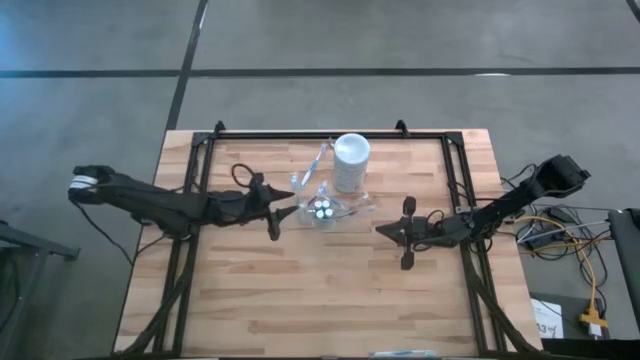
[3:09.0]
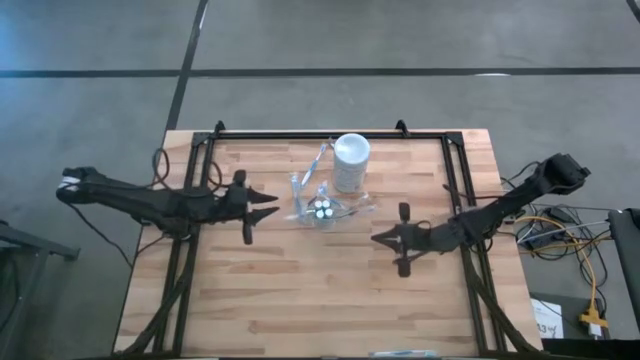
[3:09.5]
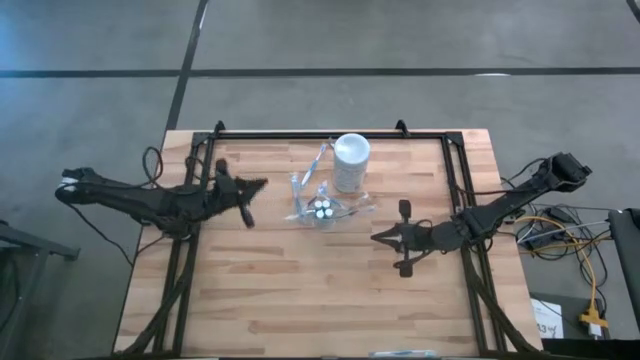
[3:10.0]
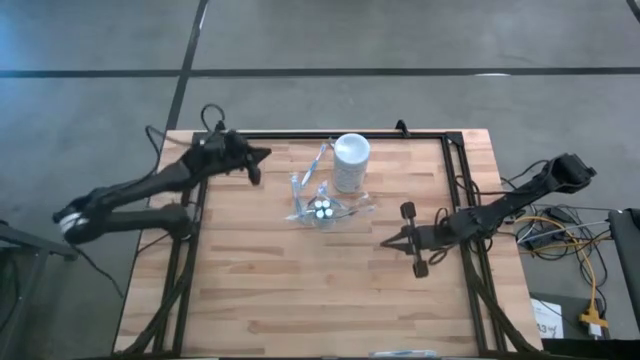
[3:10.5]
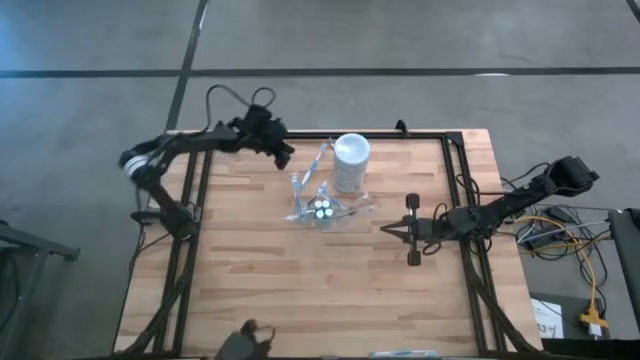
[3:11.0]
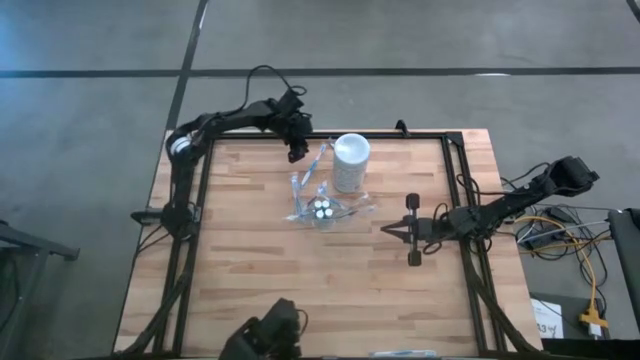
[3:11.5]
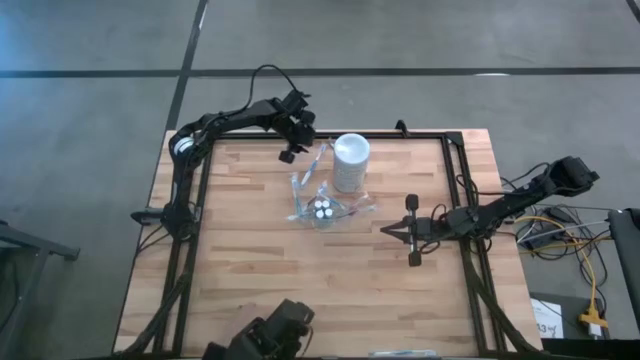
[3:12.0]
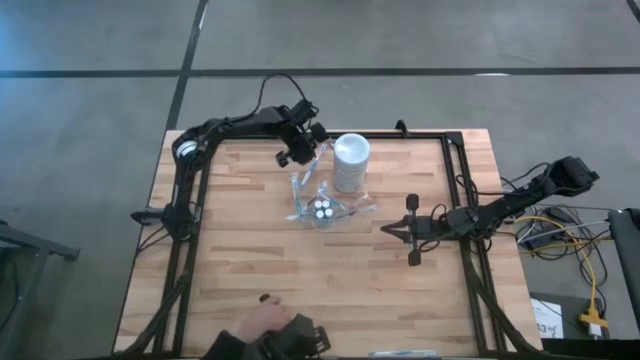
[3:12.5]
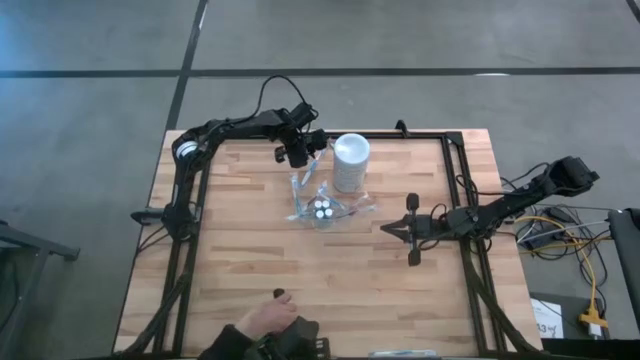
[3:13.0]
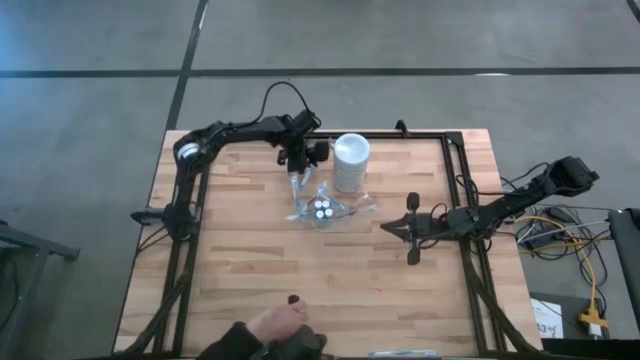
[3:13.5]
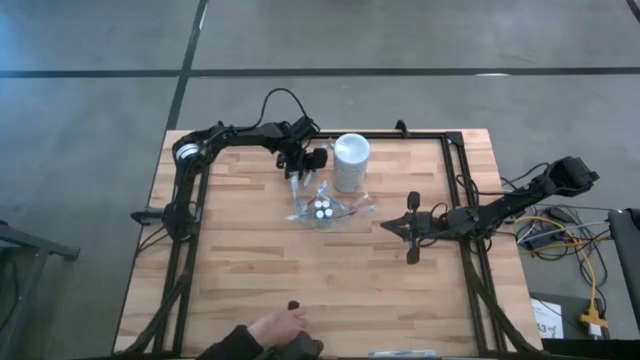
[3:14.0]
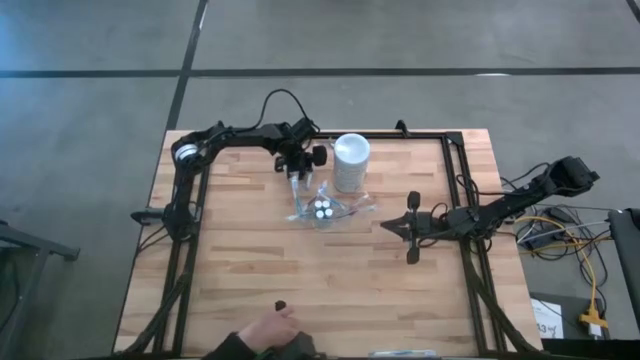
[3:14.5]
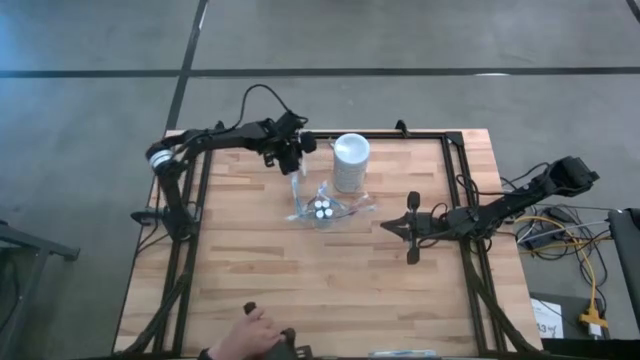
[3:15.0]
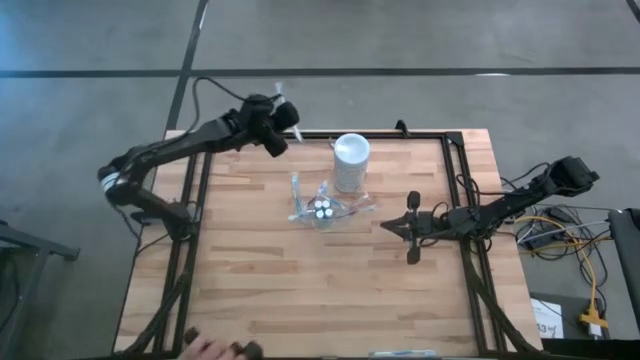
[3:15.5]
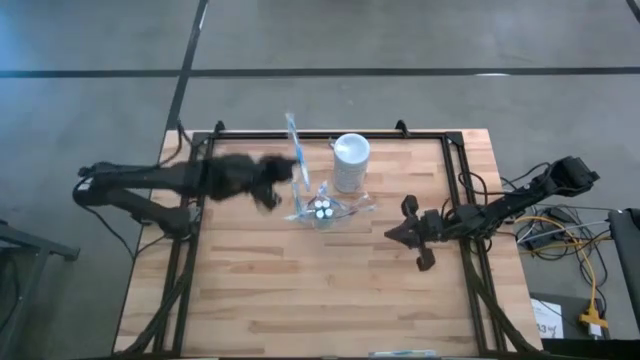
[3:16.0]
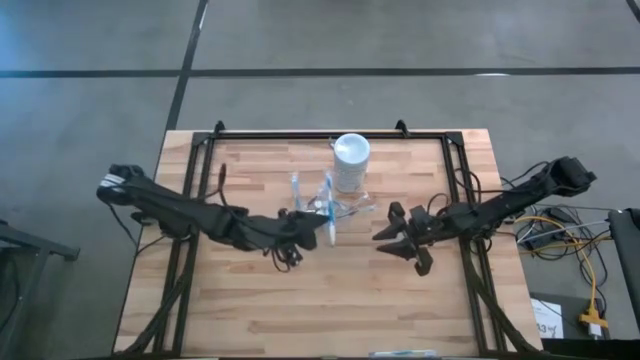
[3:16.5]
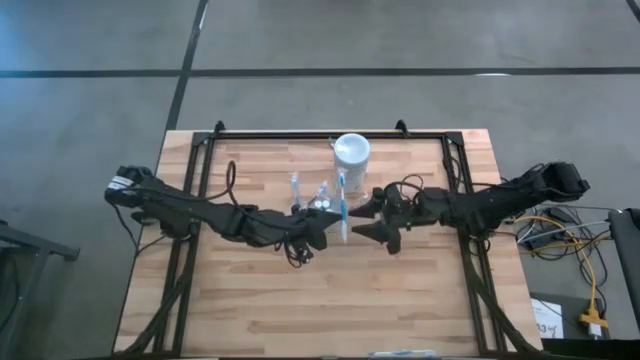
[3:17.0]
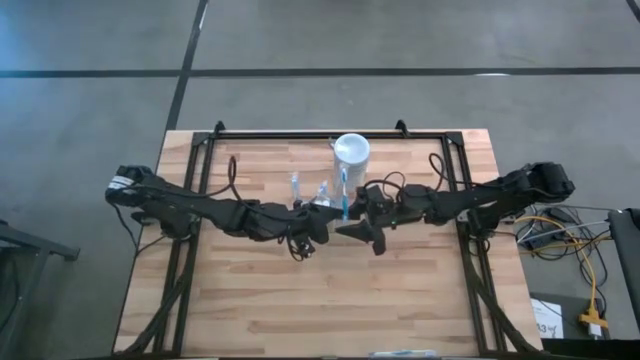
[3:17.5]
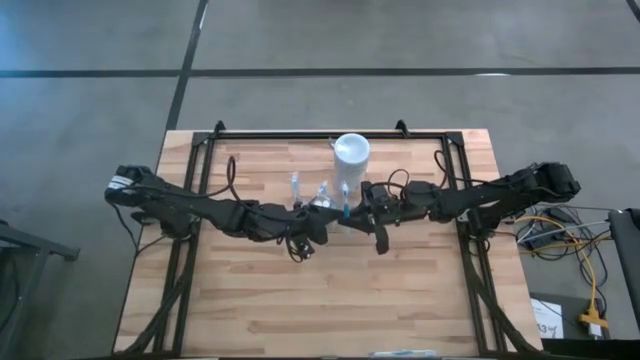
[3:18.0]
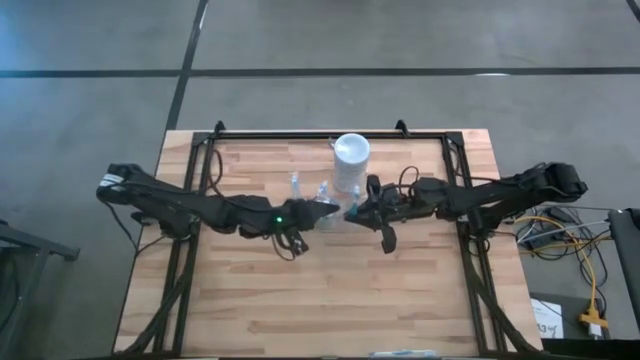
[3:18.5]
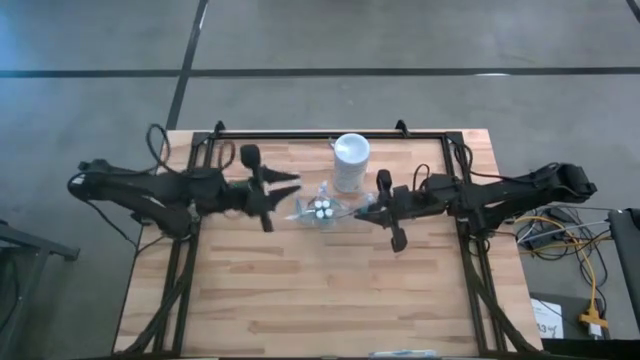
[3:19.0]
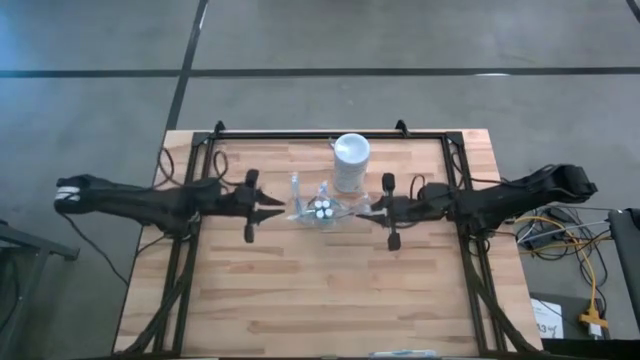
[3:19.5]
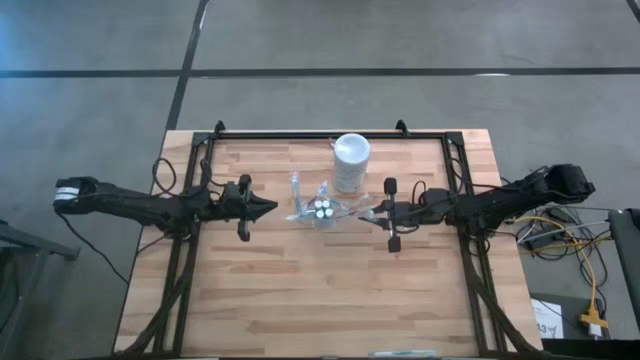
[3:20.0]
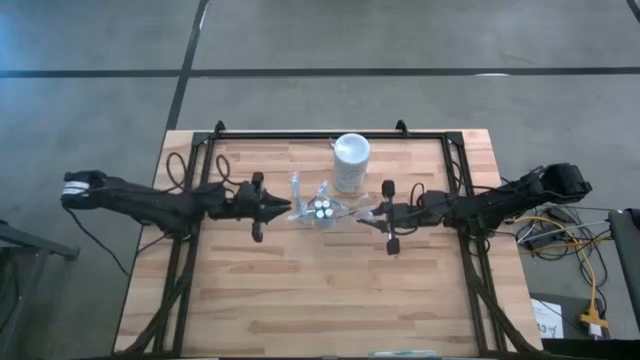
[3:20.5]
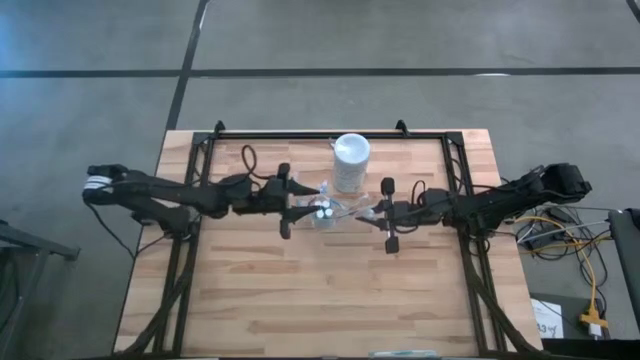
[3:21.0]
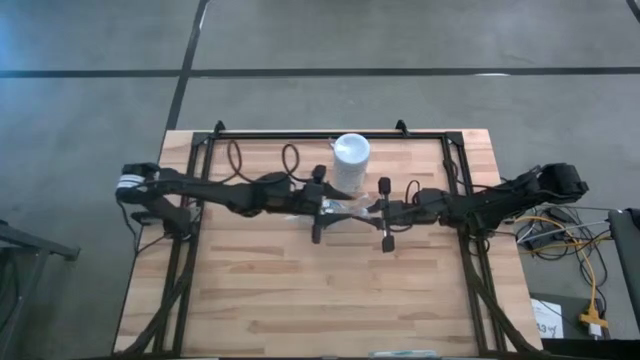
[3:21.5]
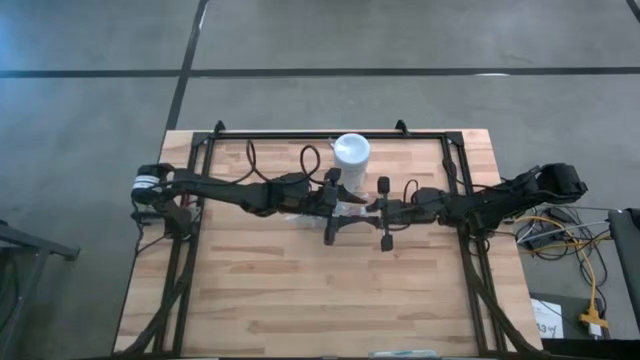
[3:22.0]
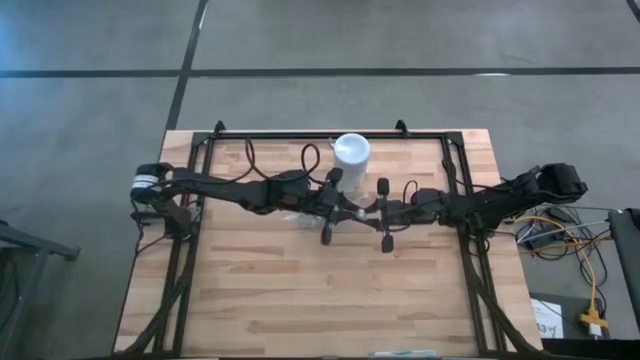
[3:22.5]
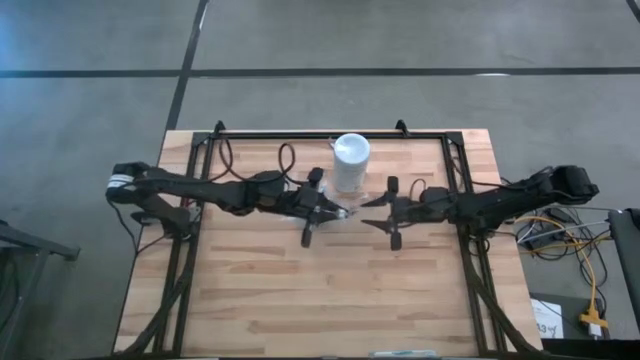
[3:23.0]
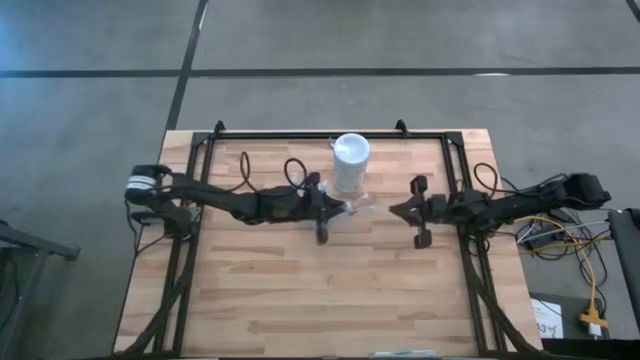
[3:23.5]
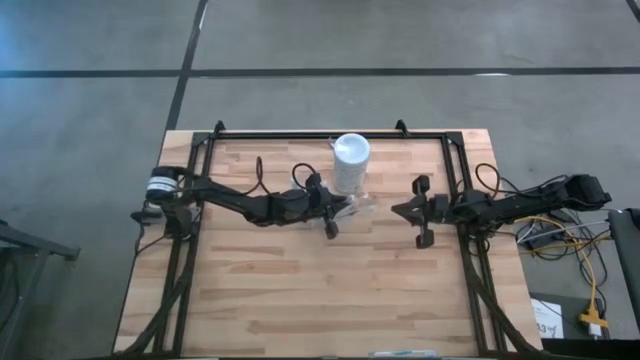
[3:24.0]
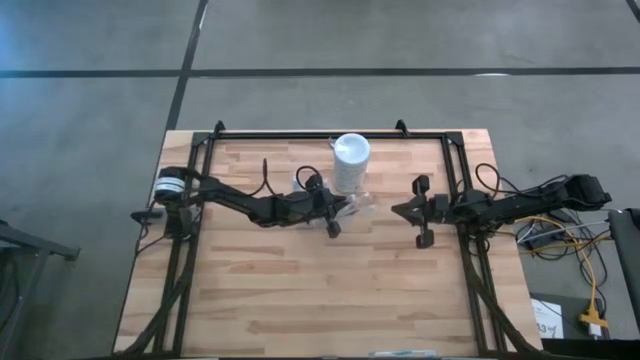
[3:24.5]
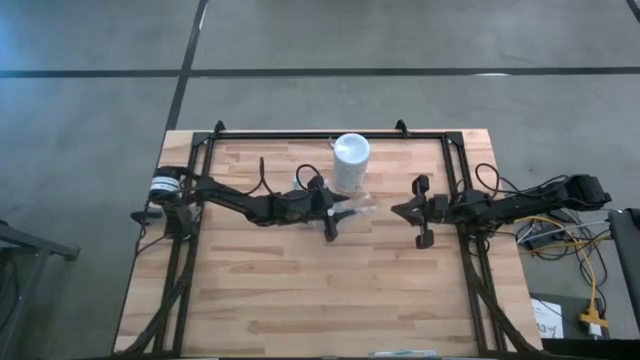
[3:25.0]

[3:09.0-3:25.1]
Task: Pick & Place toothbrushing station
Put the blue toothbrush into the transparent organizer
